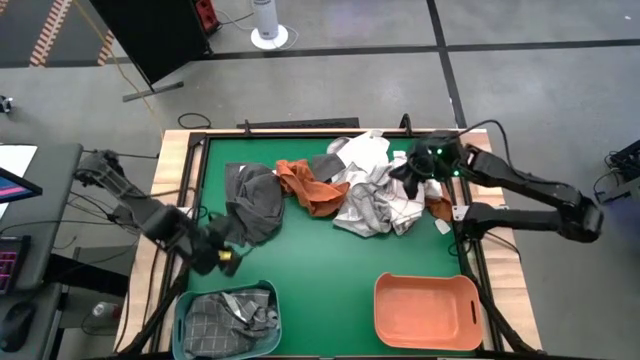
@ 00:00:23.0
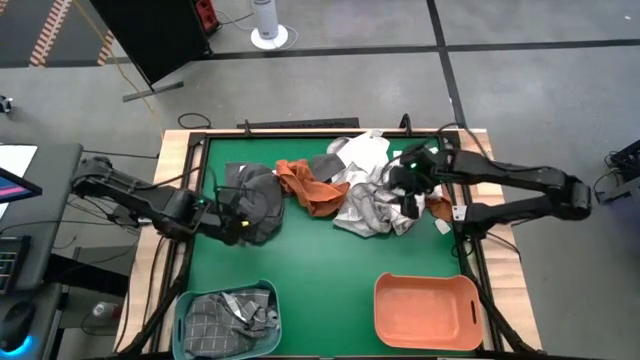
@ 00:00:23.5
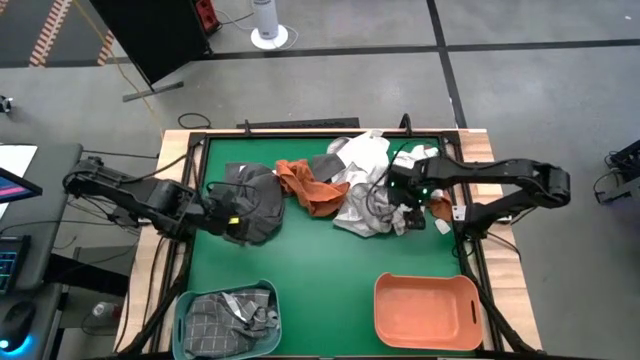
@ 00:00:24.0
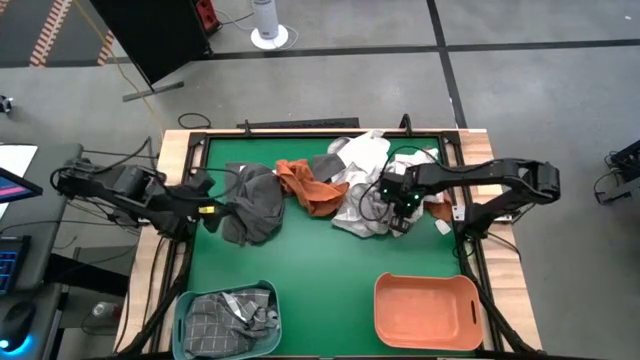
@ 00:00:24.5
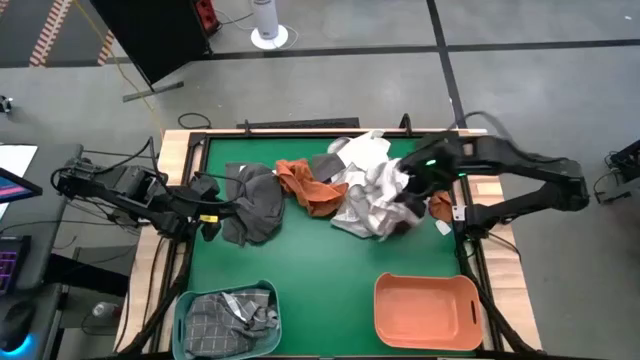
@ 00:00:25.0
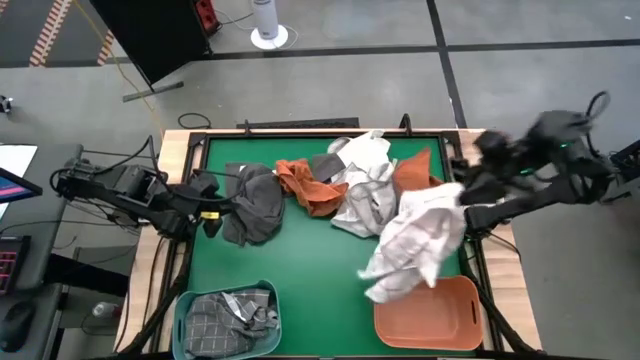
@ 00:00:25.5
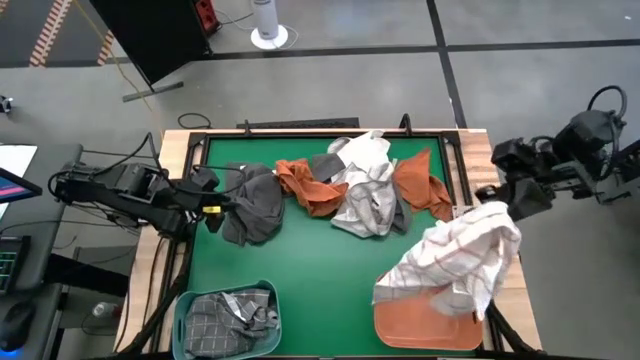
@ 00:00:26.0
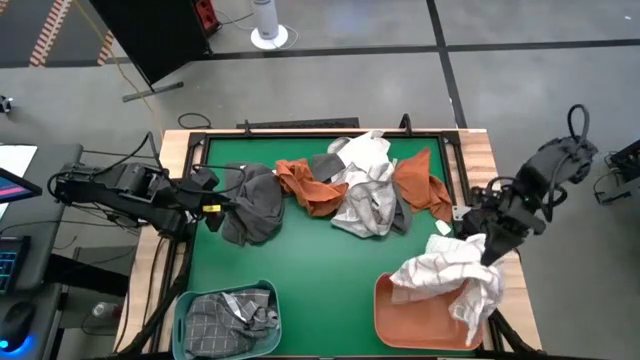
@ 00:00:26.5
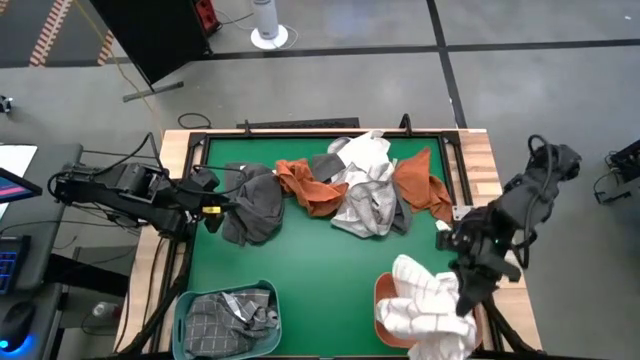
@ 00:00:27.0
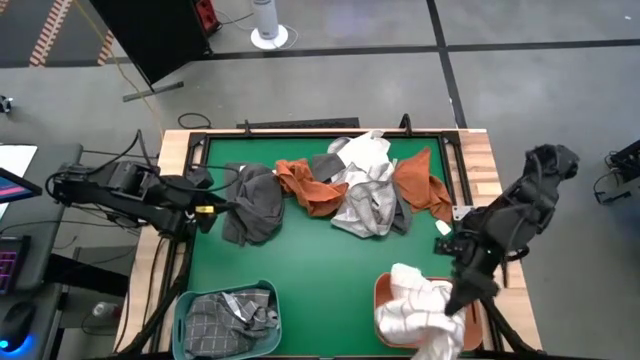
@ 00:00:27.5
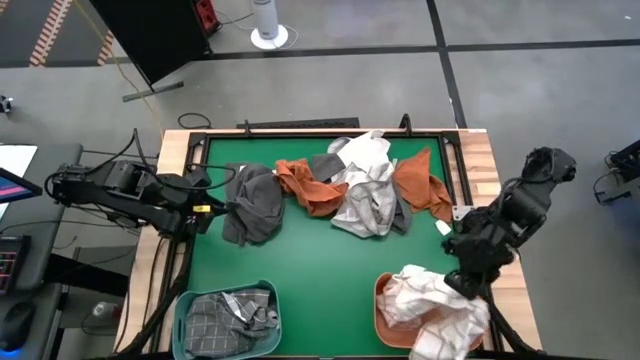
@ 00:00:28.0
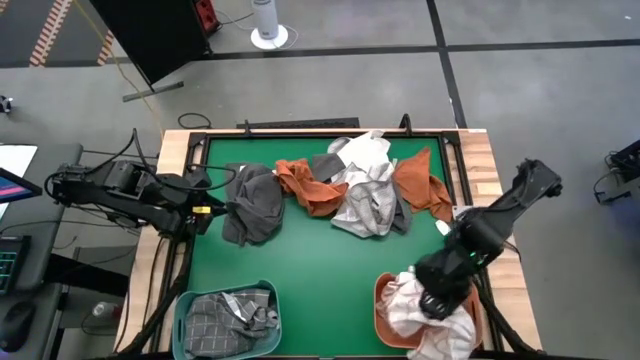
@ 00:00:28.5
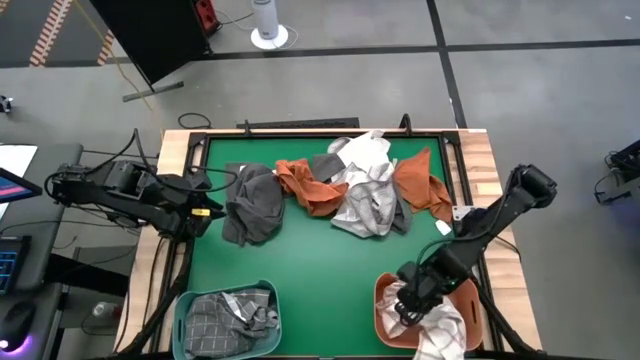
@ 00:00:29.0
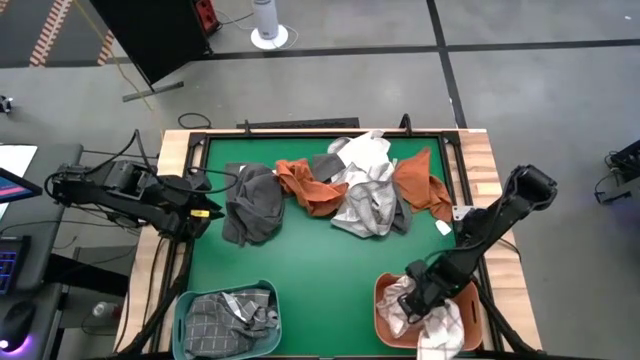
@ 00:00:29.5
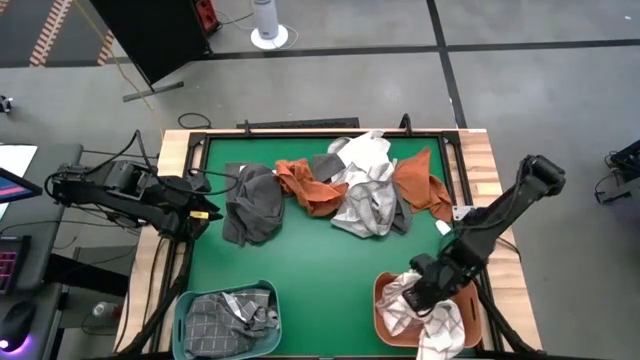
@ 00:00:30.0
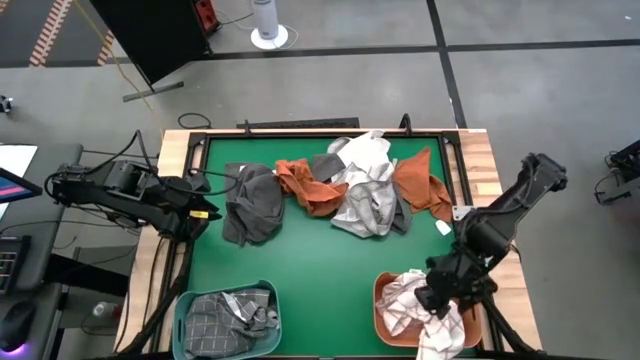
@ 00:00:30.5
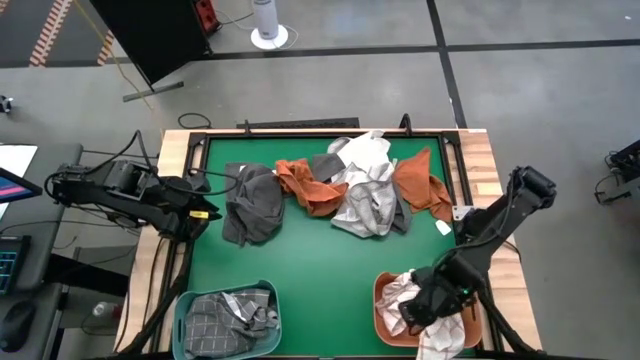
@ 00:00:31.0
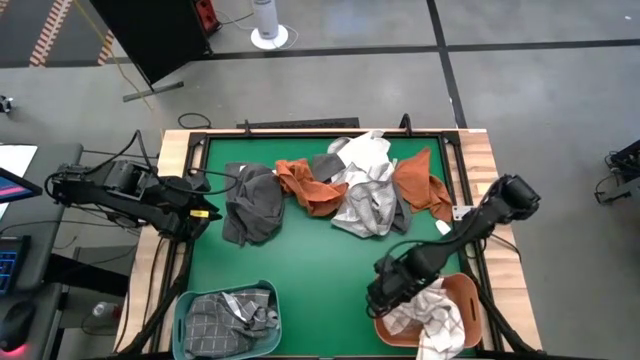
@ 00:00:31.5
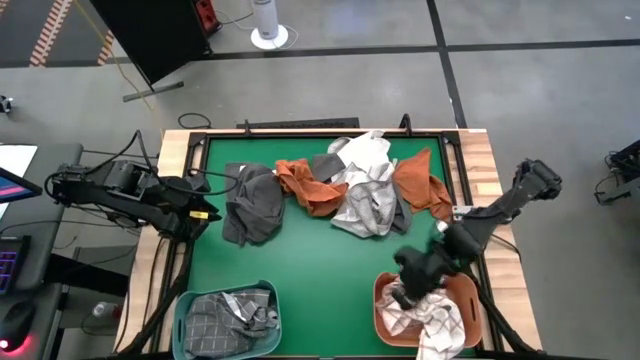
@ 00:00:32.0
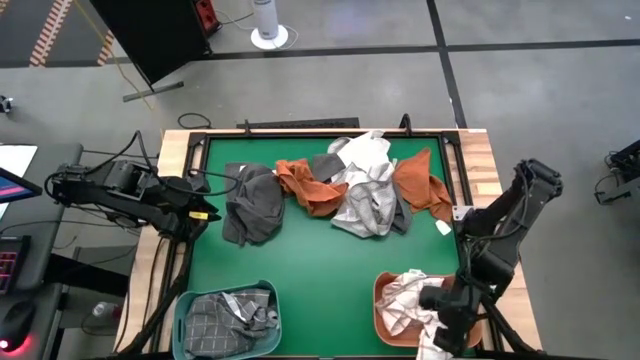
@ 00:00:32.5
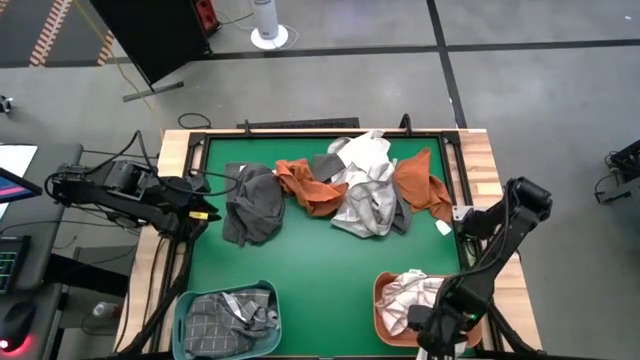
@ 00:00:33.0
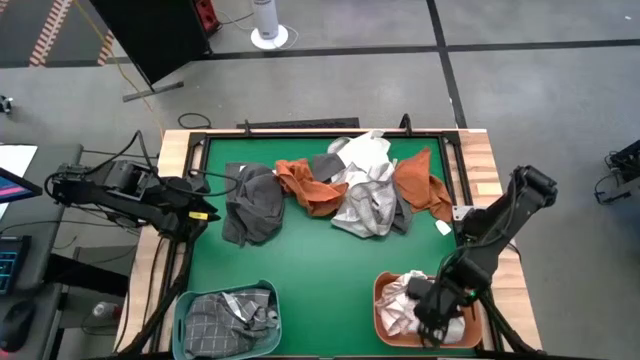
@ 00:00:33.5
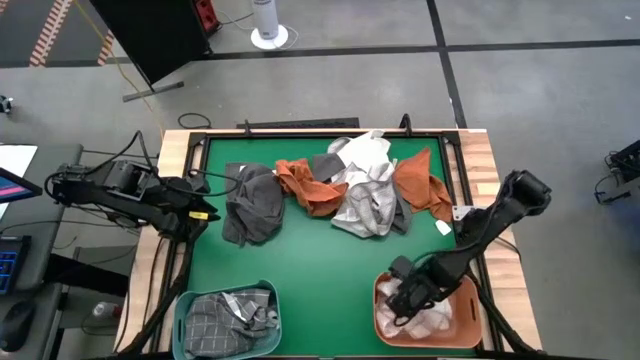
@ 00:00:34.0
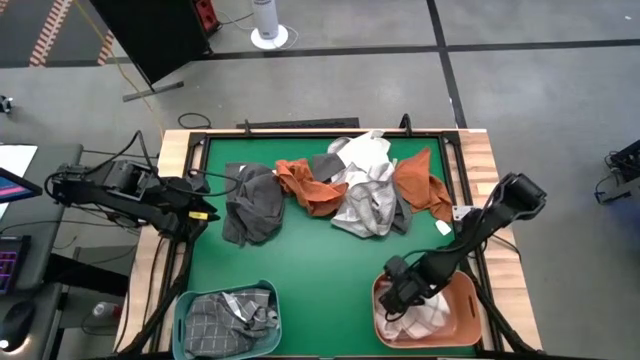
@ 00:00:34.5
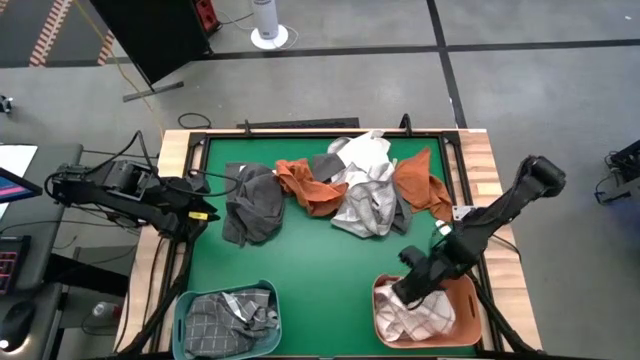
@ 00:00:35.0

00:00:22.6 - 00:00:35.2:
Task: Sort towels by color in basket
Put the white checkered towel into the orange bin
